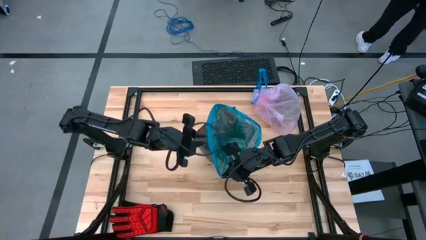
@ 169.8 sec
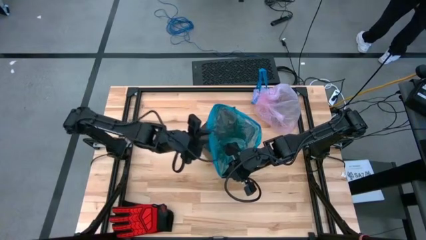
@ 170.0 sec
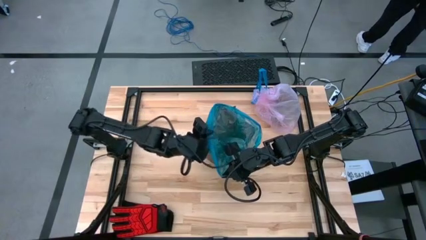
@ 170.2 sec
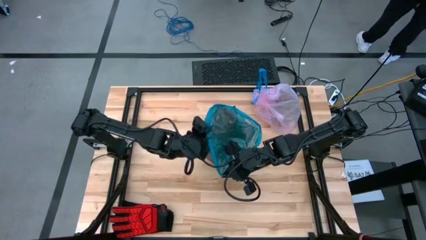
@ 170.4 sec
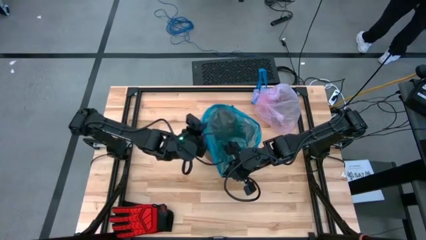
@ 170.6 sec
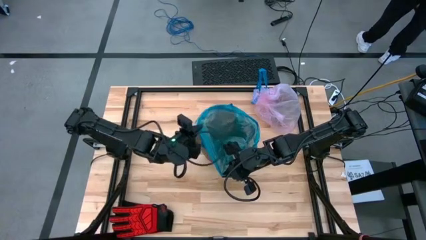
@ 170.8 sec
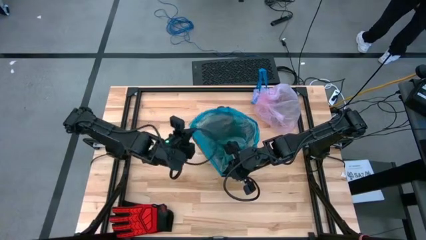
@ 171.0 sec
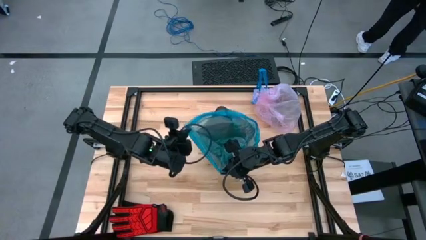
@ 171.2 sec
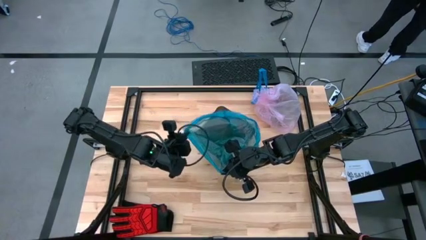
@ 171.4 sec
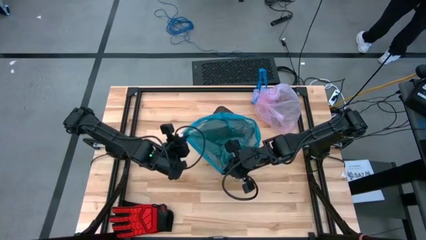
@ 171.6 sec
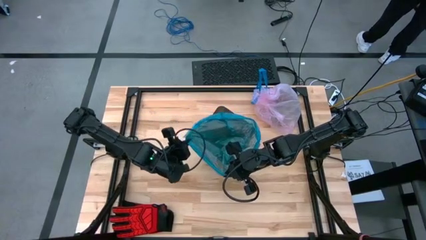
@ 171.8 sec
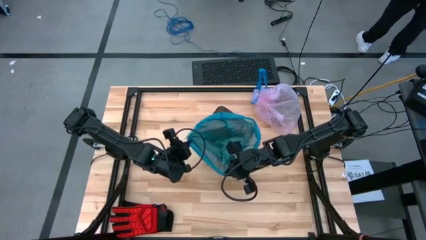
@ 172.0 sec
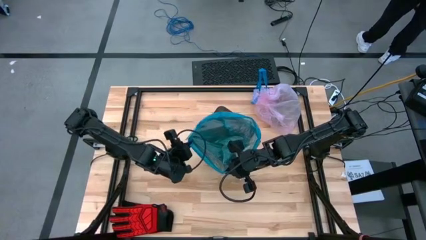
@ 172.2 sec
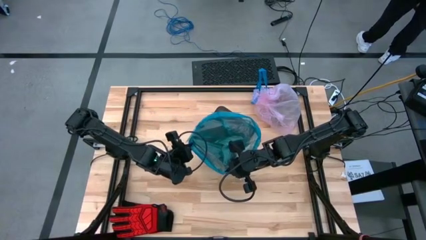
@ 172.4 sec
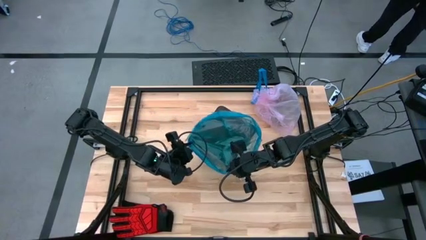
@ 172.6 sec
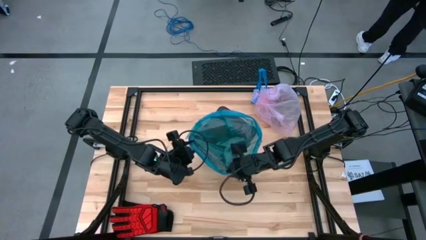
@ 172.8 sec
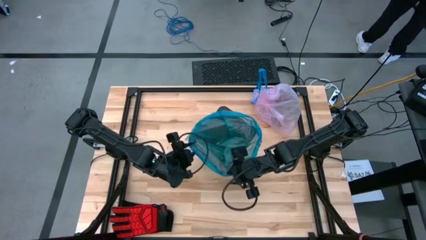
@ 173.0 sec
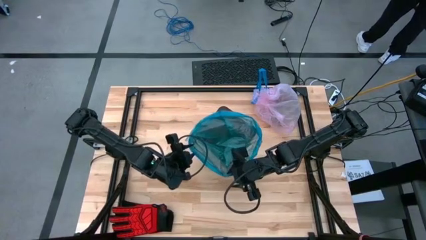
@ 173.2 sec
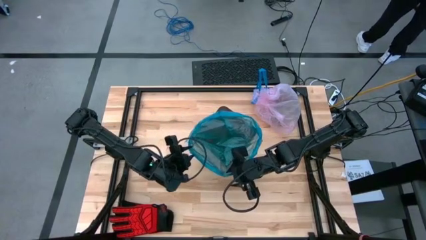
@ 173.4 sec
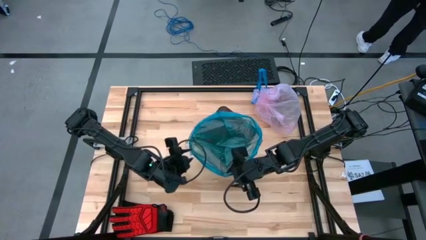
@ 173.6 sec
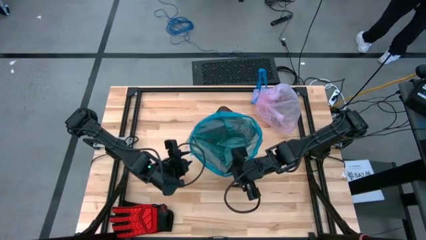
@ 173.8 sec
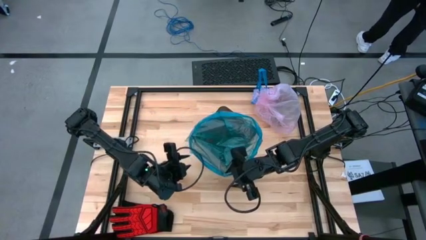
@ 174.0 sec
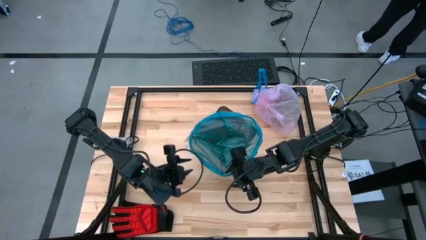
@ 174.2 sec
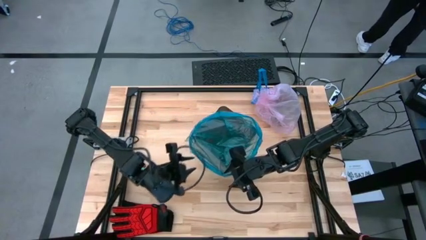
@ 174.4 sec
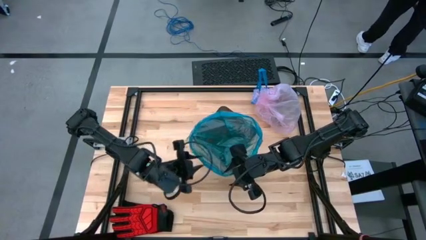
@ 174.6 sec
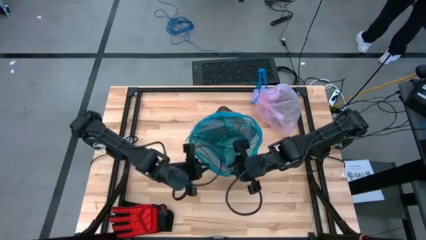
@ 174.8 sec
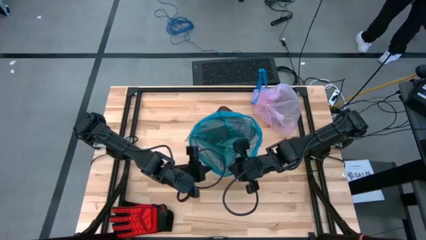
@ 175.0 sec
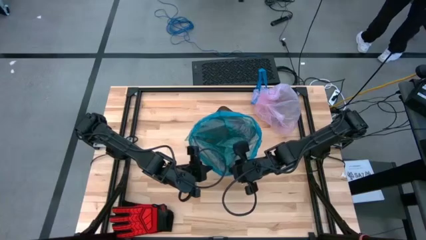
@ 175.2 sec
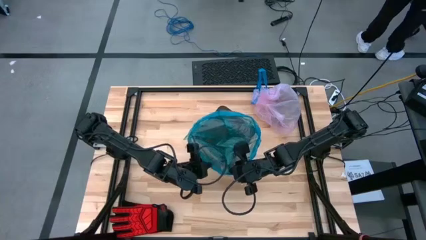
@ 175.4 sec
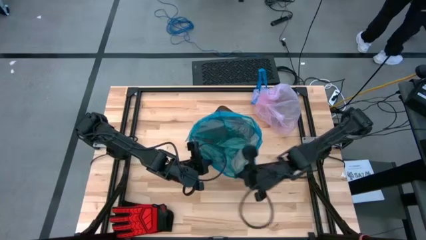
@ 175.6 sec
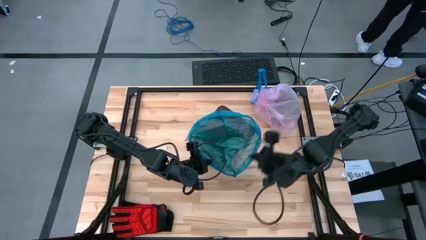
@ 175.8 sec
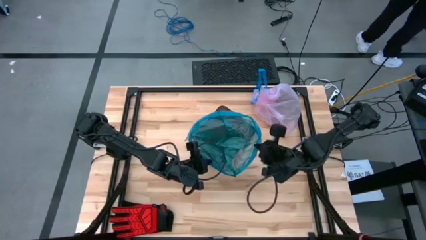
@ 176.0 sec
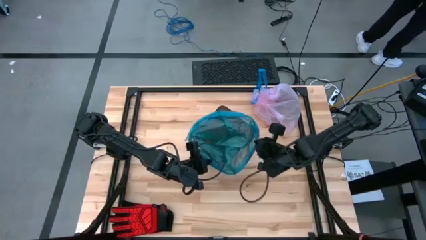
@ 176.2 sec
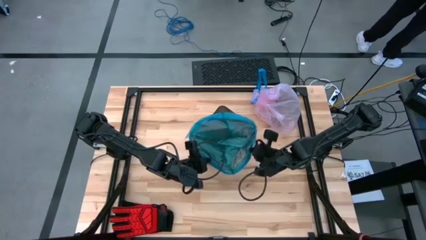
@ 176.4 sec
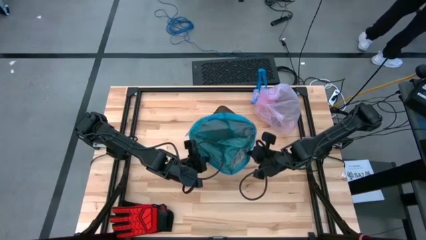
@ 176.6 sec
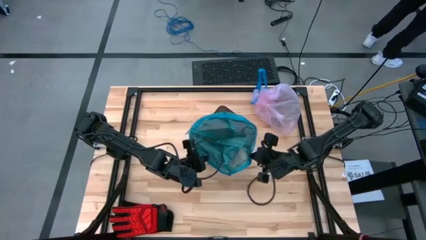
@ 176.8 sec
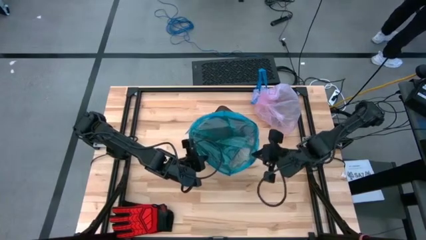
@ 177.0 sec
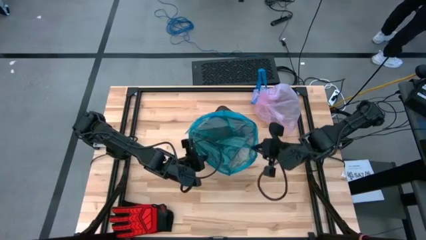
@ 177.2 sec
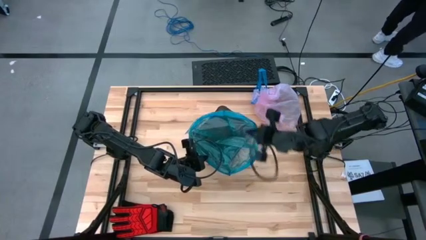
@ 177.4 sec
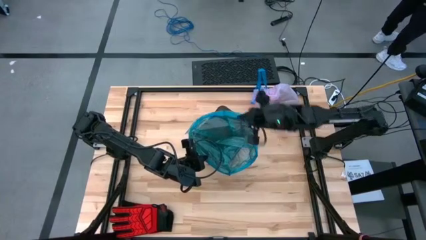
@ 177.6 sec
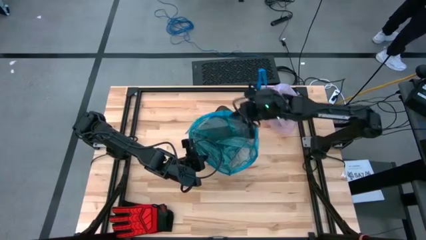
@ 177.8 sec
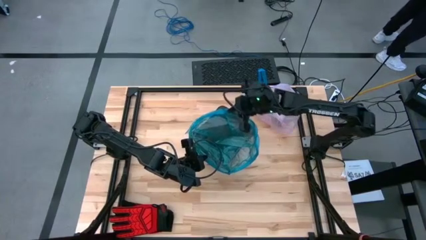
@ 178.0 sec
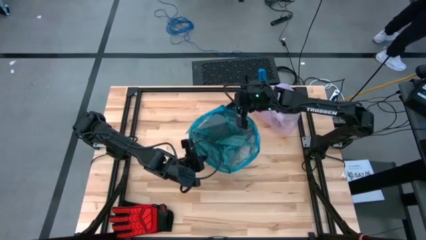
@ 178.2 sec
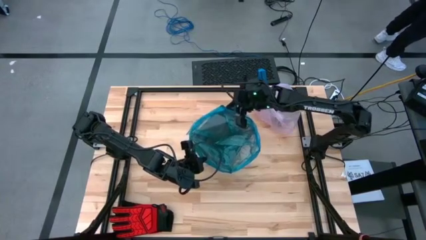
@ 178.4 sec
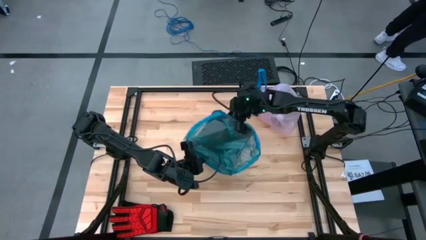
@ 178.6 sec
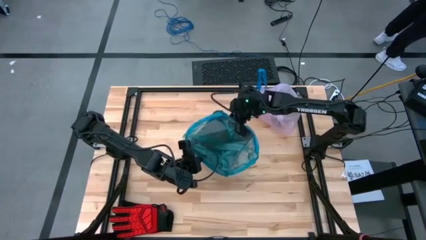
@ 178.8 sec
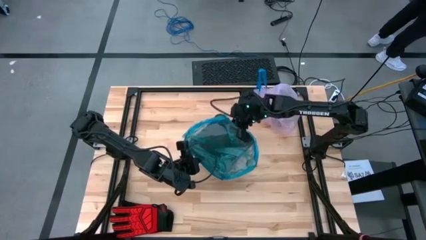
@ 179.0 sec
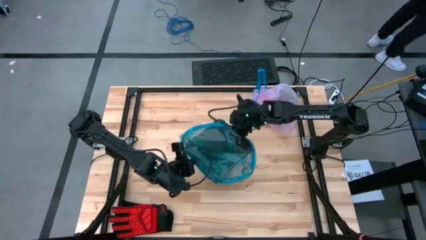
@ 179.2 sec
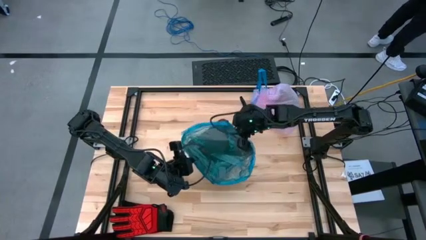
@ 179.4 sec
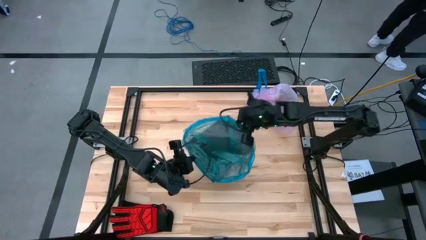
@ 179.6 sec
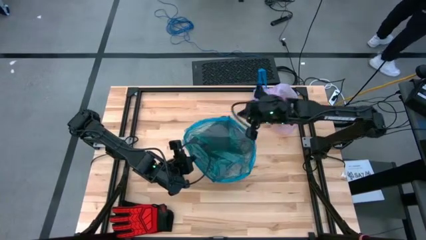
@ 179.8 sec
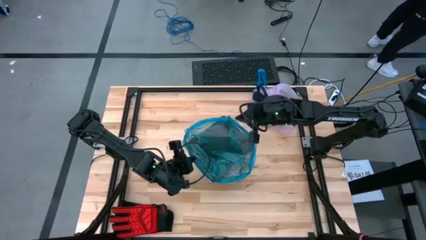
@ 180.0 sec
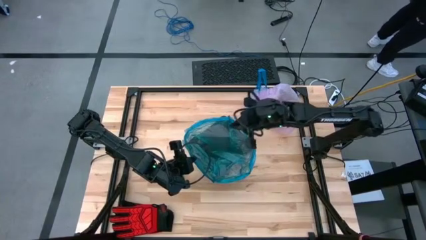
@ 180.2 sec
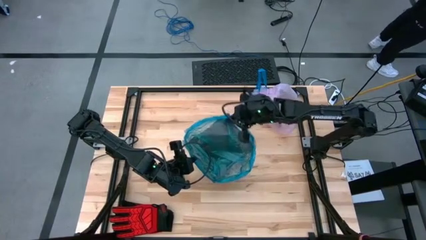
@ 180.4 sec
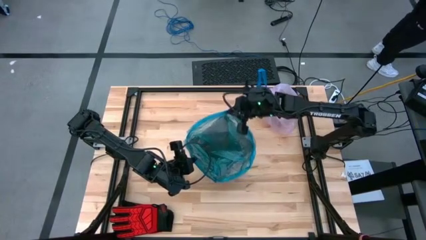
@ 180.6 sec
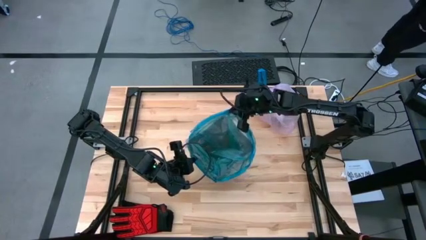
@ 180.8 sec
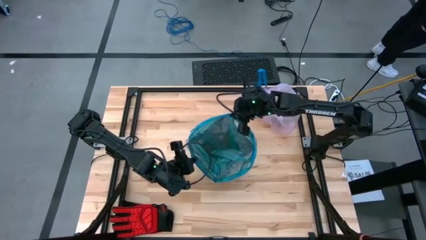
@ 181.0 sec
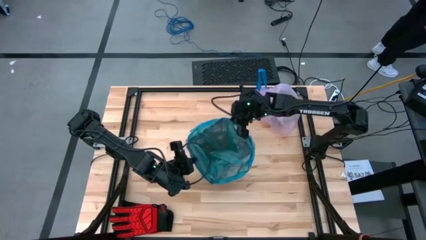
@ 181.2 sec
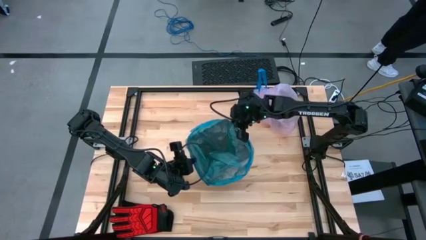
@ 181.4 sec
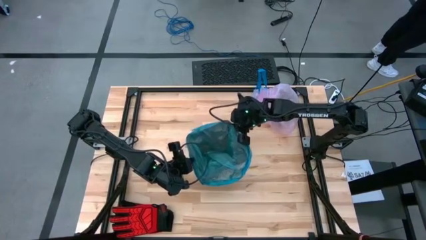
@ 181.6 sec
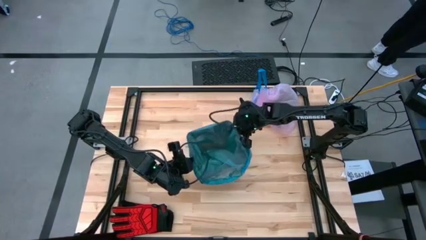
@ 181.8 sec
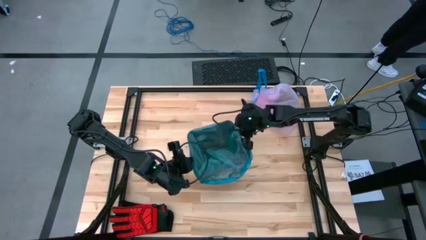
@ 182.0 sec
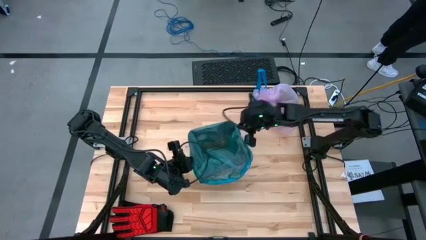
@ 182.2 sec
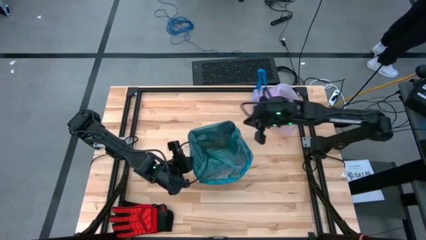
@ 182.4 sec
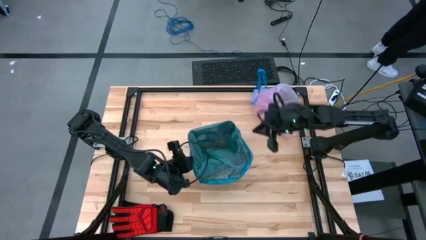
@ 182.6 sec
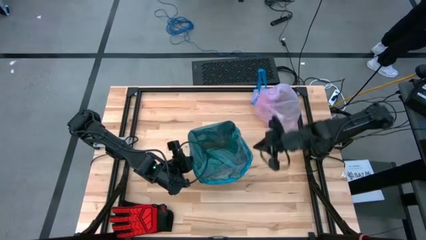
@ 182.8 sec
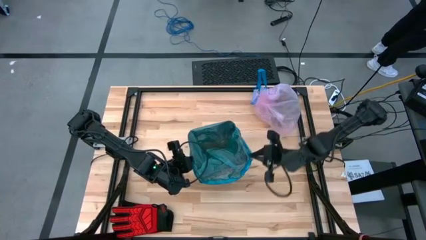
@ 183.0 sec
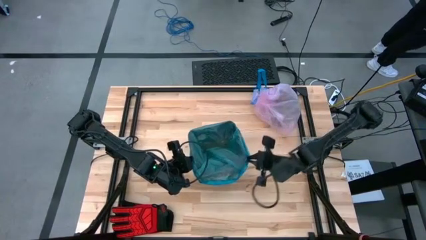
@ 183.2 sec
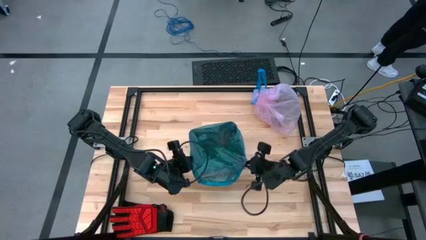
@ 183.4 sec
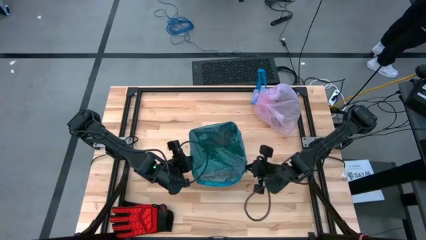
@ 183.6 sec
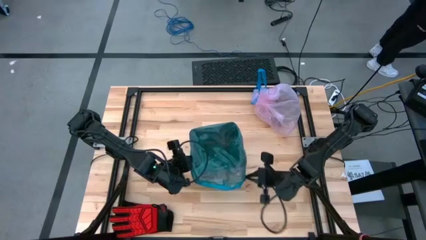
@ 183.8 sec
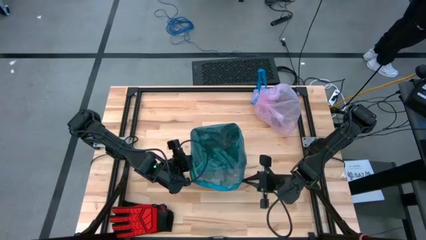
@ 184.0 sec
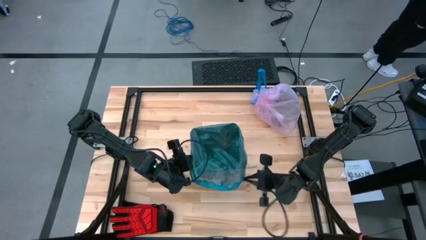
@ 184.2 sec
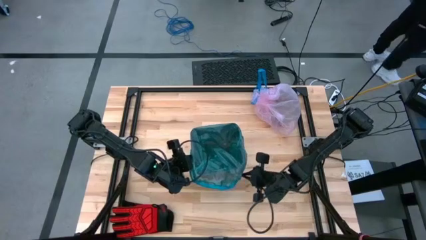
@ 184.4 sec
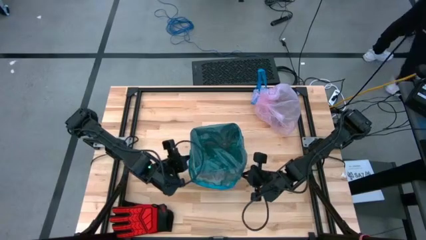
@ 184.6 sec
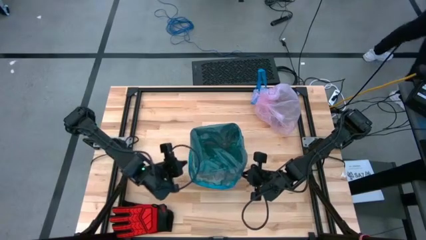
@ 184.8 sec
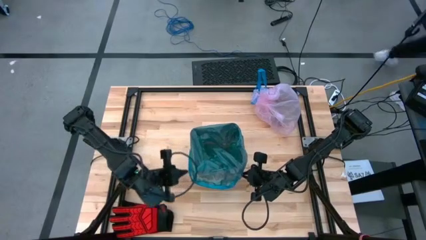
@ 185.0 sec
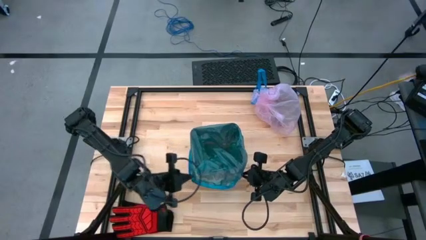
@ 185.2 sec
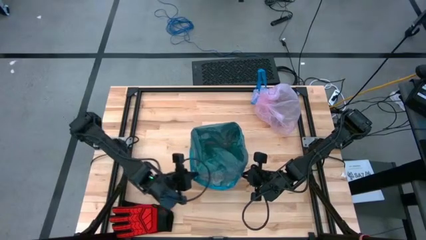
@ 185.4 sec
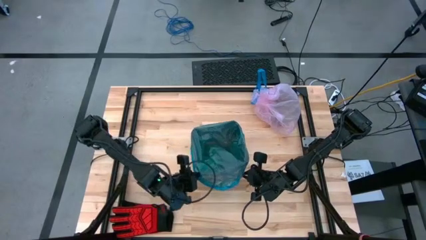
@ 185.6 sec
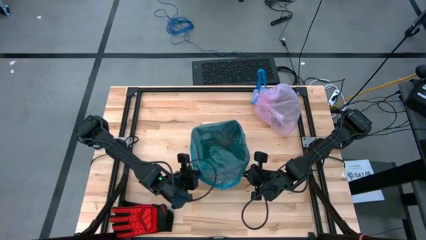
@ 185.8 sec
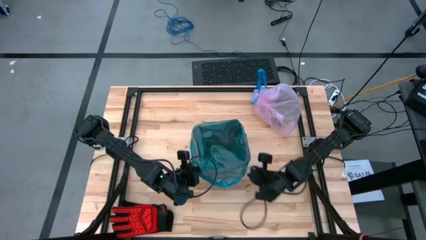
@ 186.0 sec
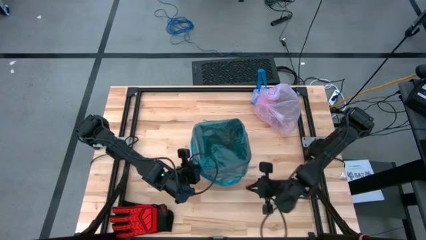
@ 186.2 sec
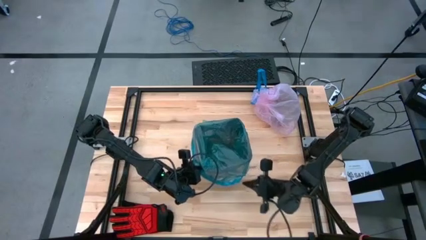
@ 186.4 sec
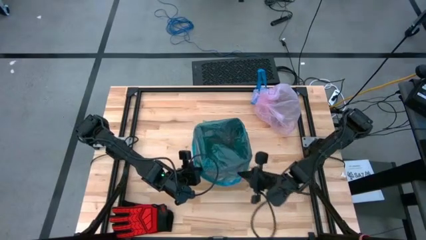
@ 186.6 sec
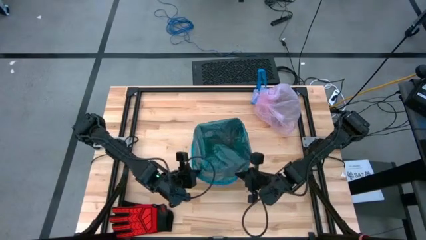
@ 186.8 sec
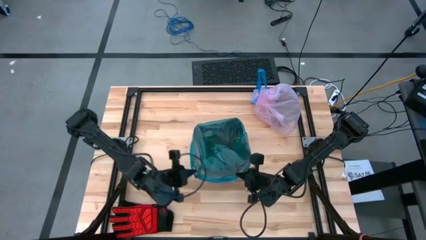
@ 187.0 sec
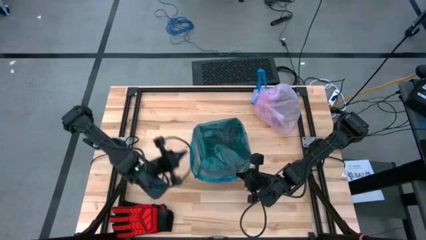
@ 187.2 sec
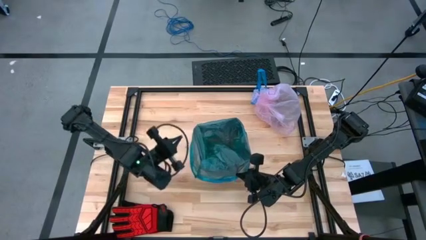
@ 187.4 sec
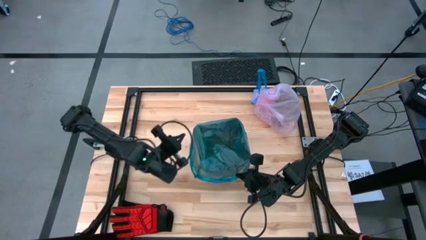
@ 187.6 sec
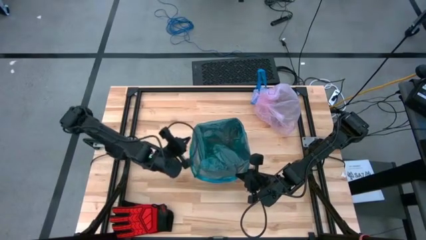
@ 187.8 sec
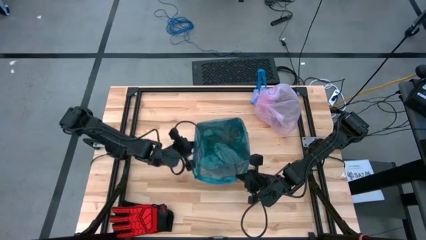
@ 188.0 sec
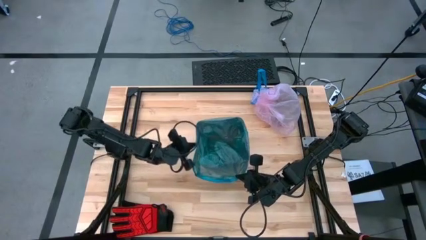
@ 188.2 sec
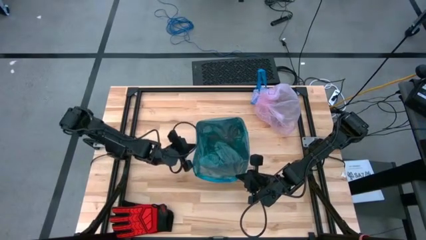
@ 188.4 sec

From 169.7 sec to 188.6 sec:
Task: place trash/remove bag and relplace
Insert a new trash bag into the trash bin
